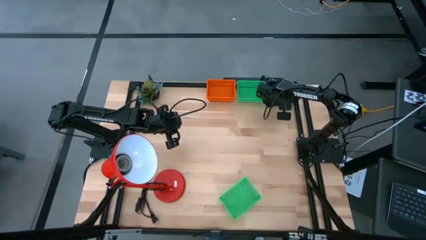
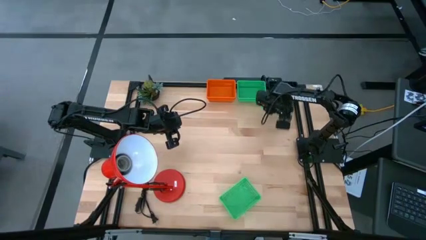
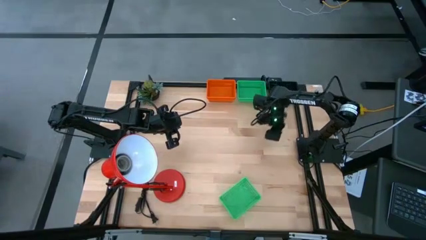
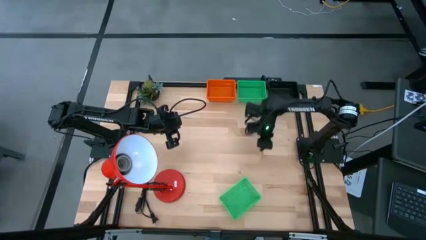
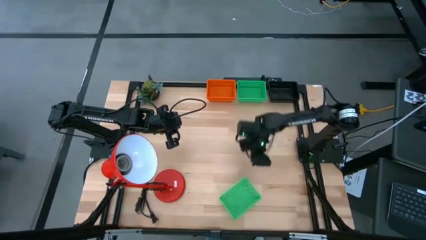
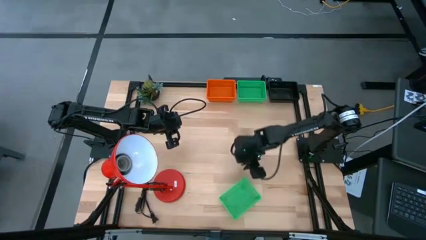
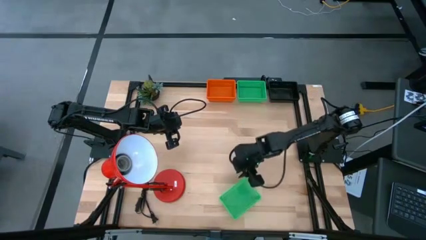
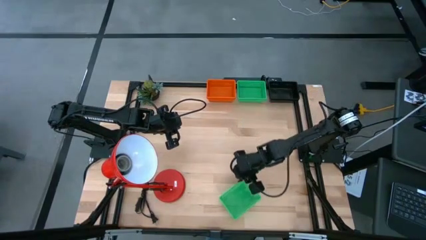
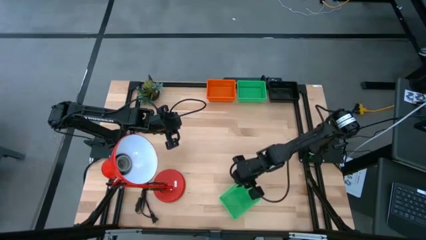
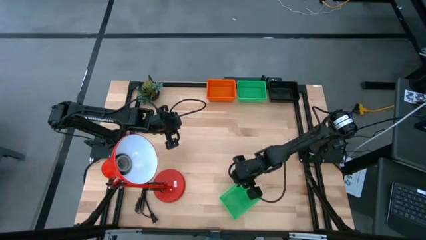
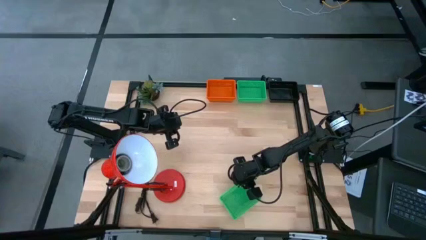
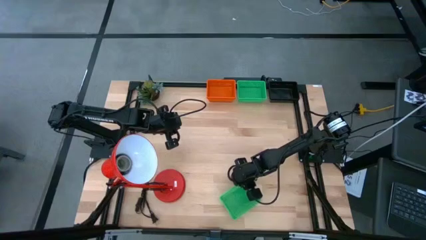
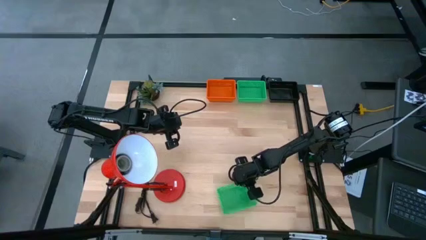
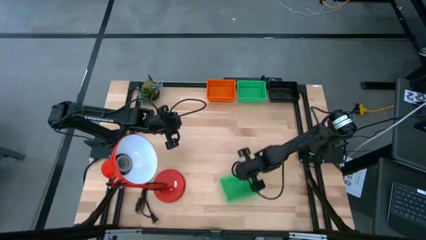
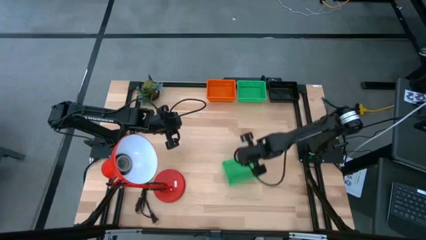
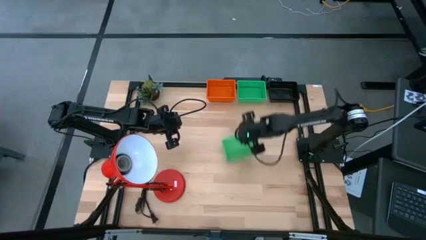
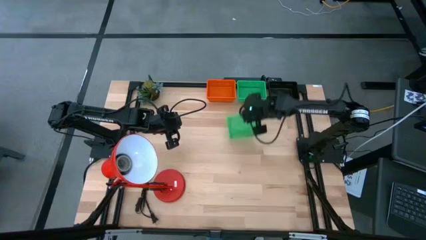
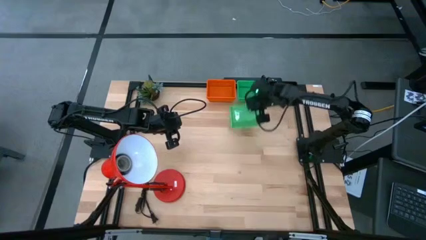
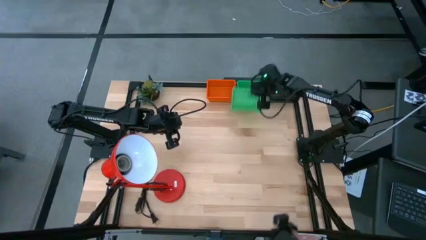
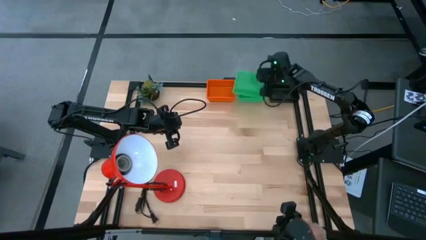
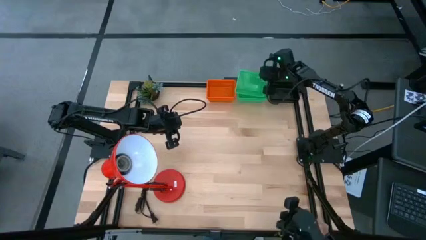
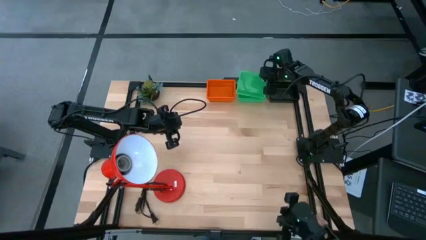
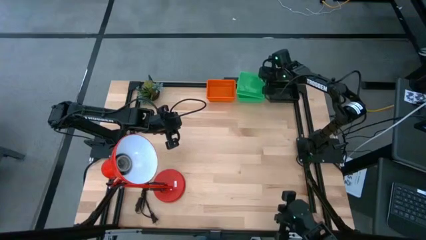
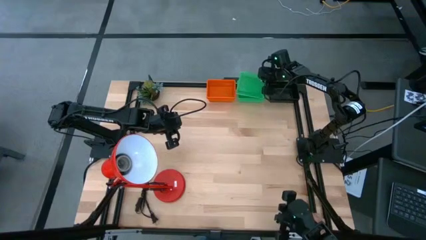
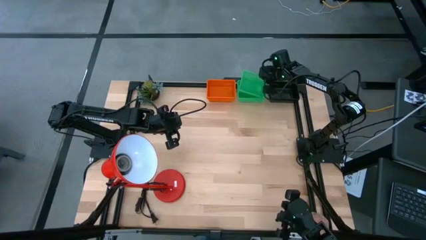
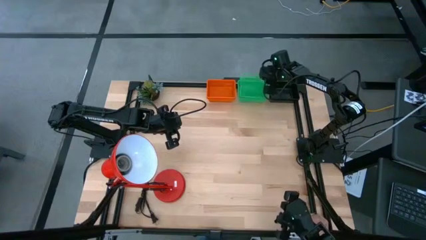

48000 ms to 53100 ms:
Stack the bottom green bin on top of the top stacked green bin

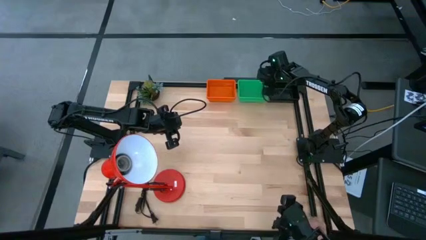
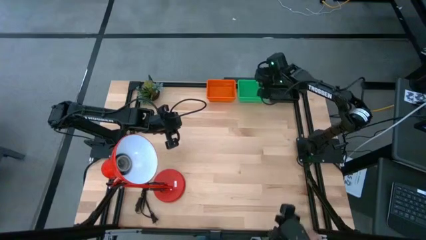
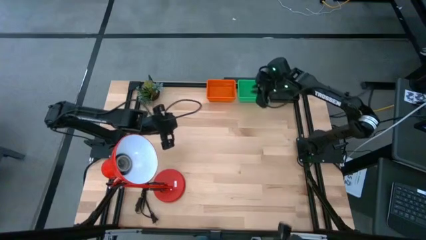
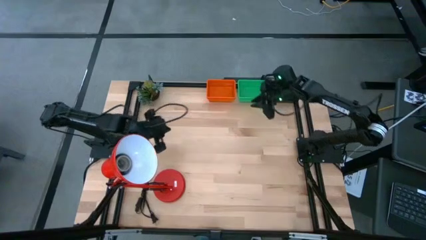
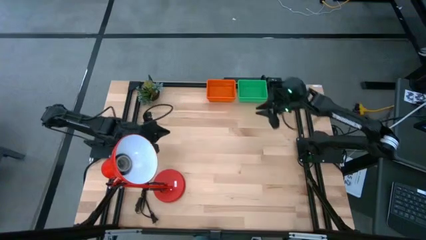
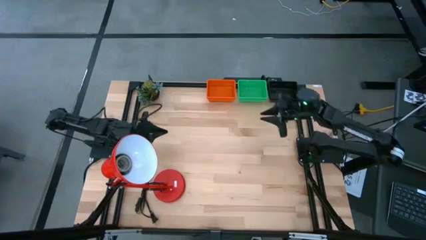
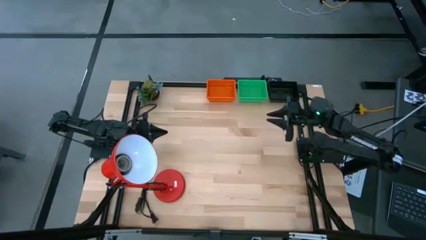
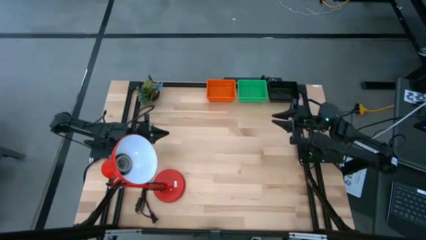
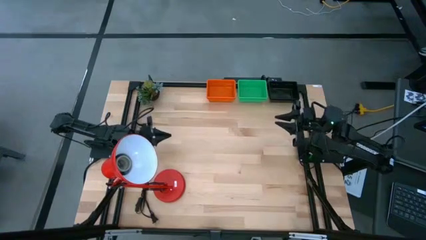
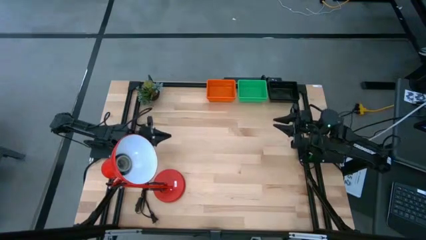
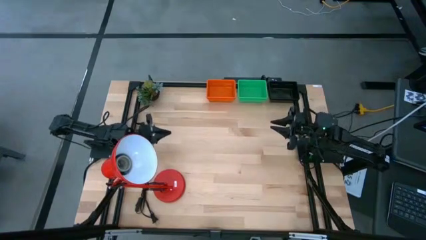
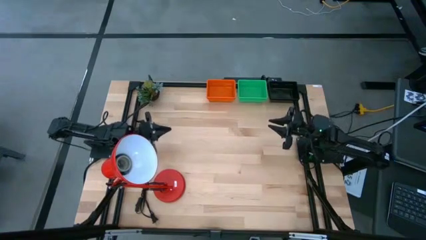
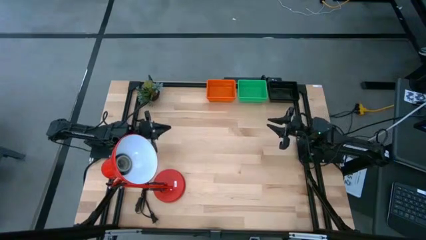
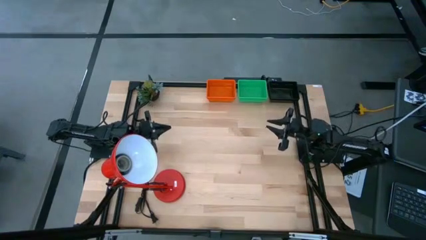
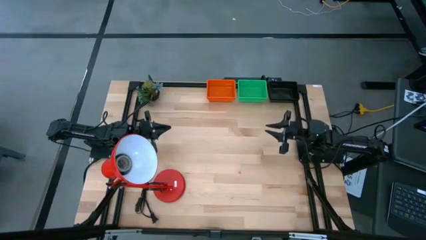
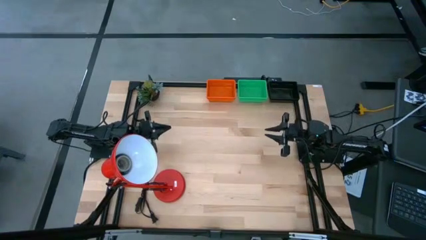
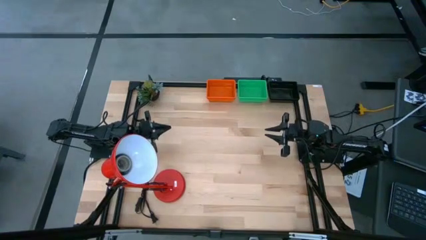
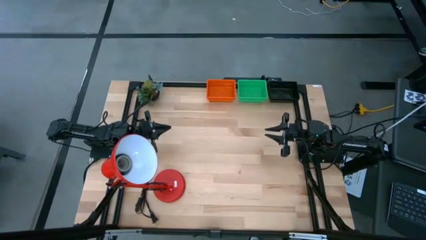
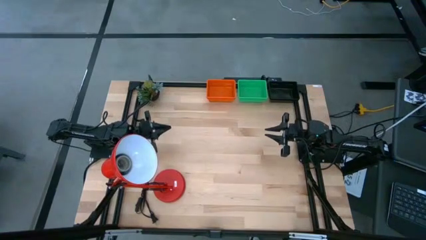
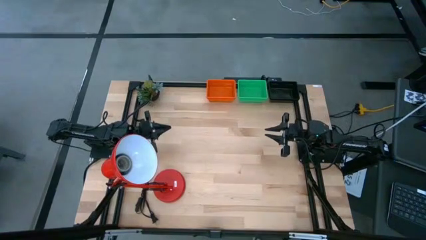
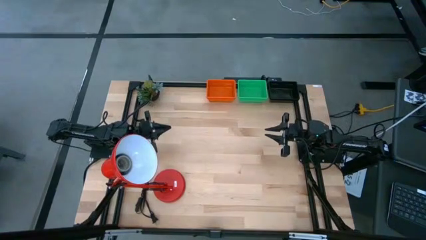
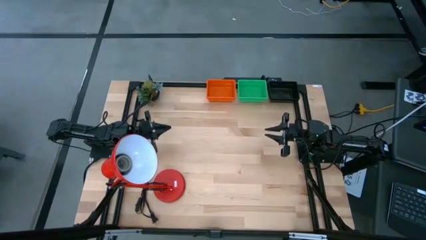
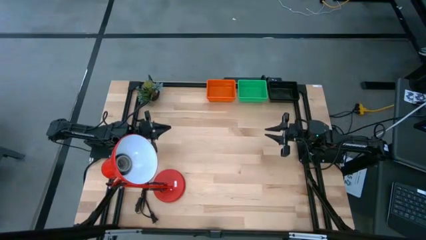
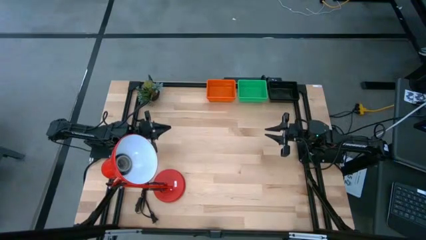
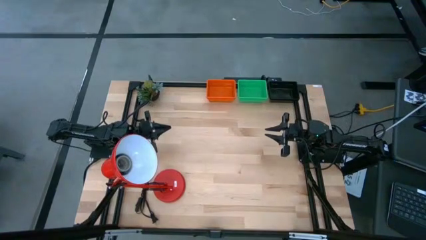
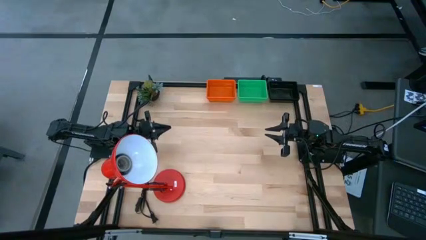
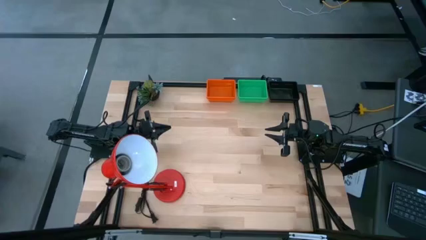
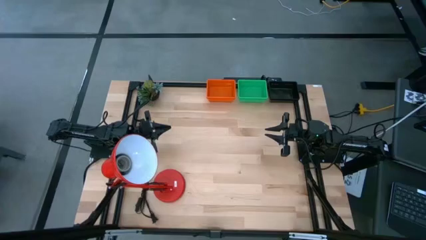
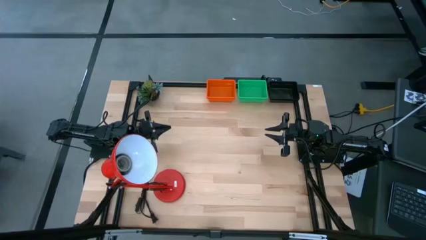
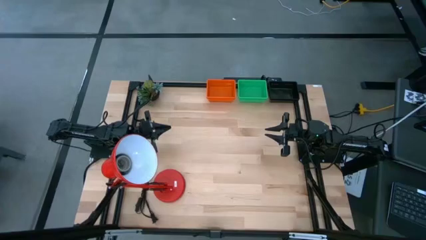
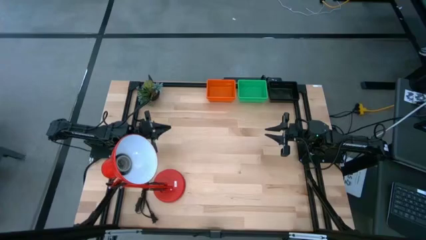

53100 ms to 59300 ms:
Return to Home Position
